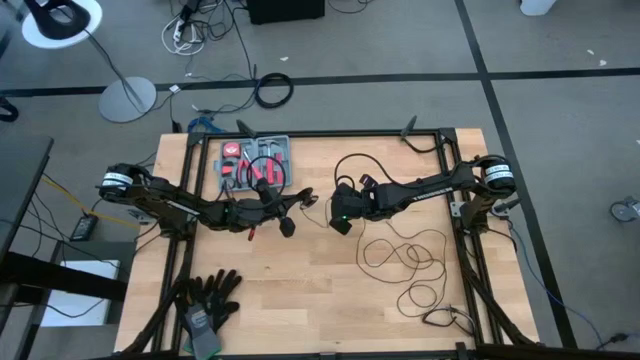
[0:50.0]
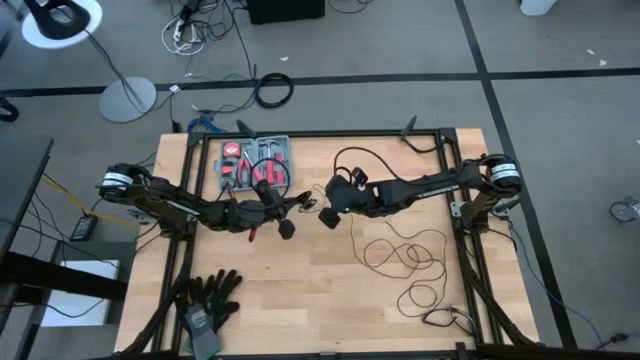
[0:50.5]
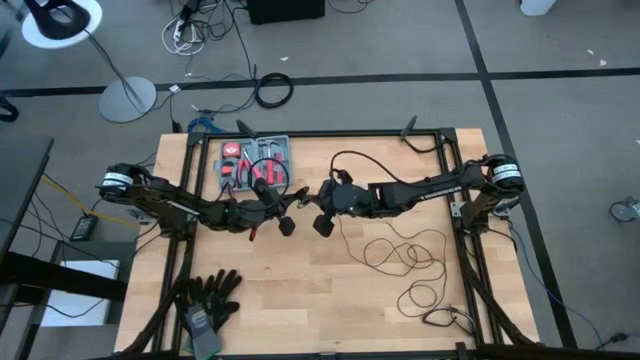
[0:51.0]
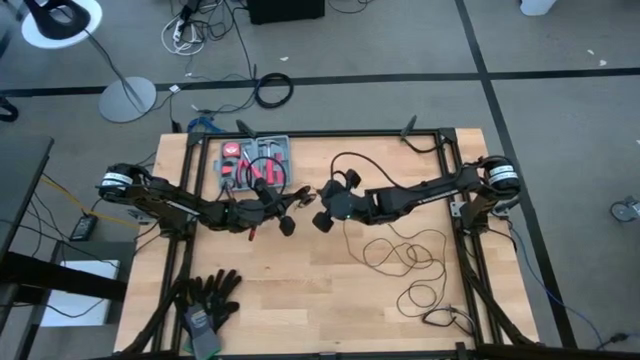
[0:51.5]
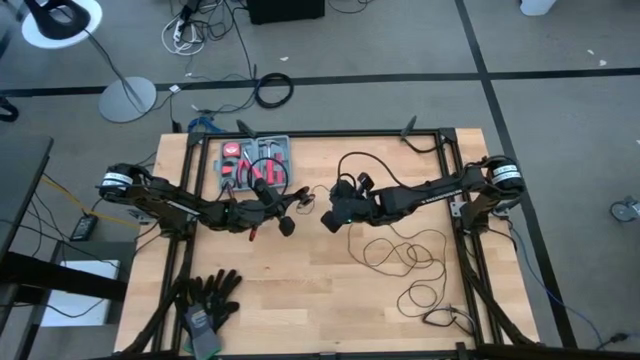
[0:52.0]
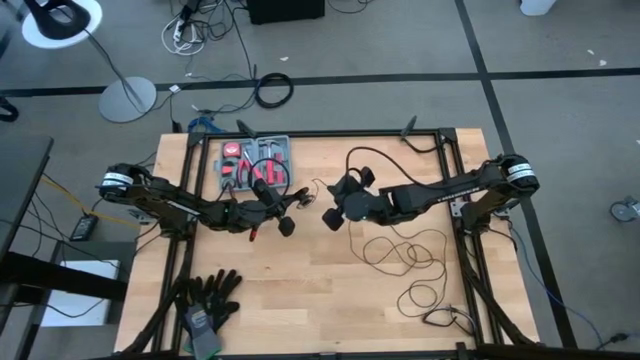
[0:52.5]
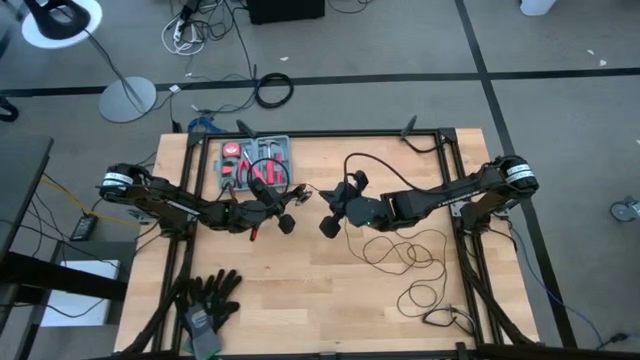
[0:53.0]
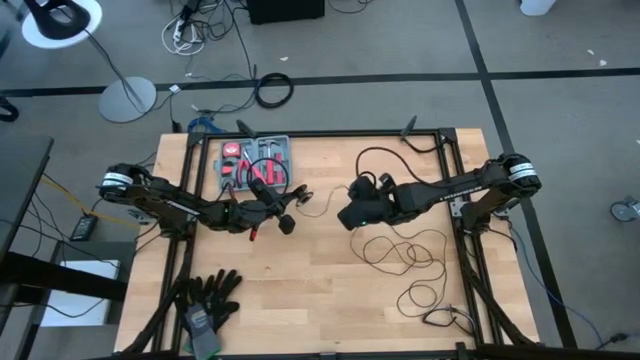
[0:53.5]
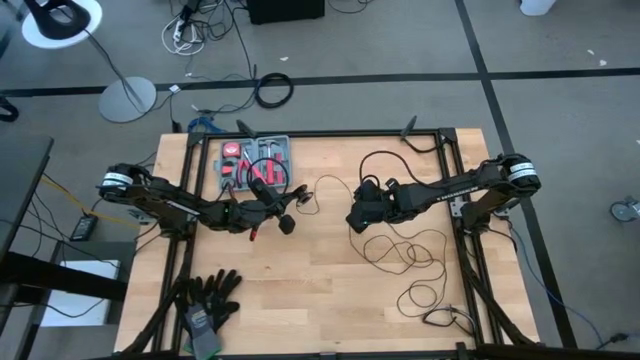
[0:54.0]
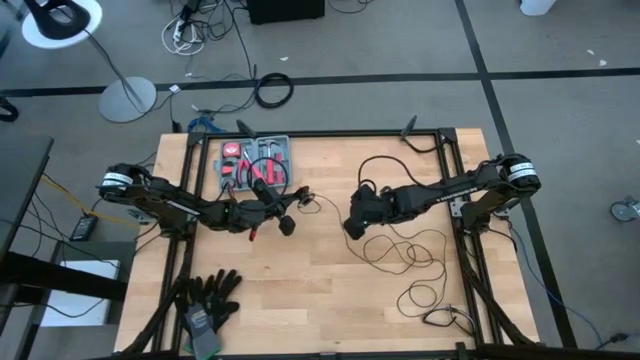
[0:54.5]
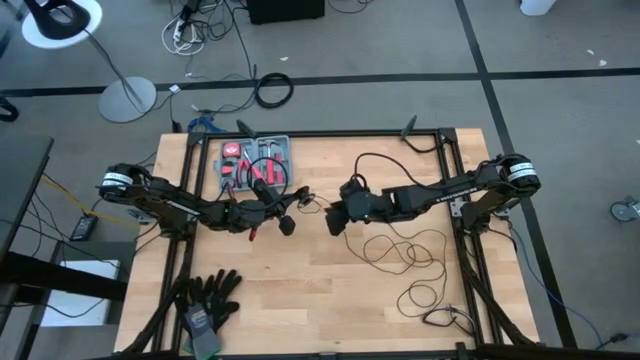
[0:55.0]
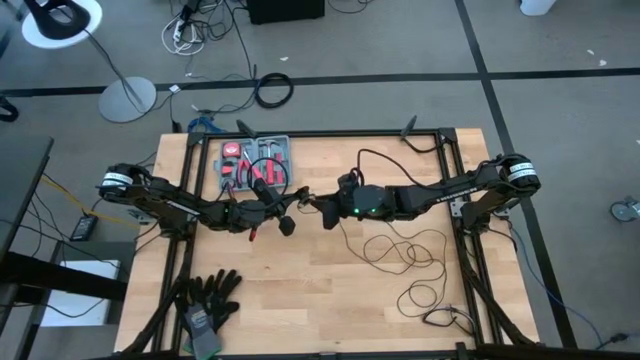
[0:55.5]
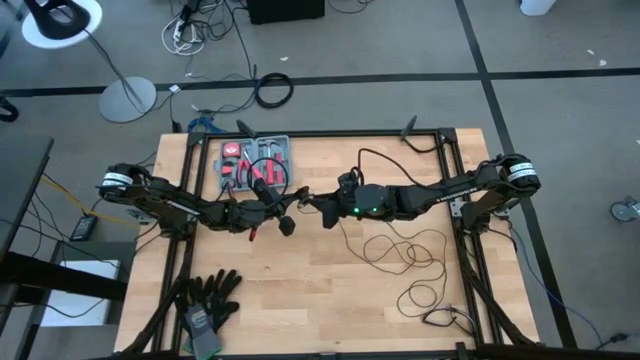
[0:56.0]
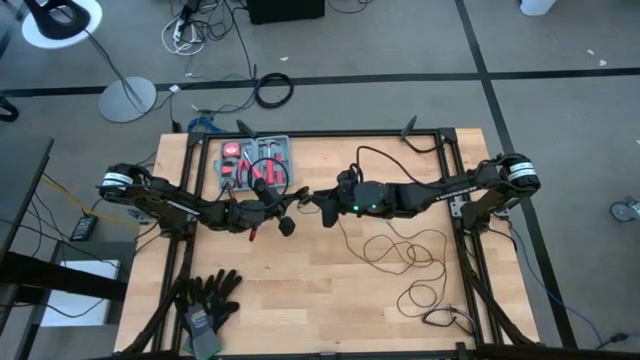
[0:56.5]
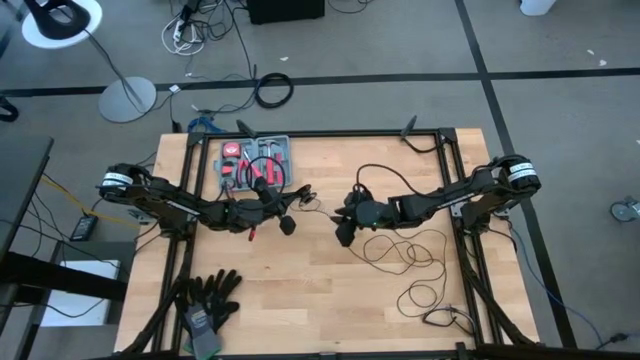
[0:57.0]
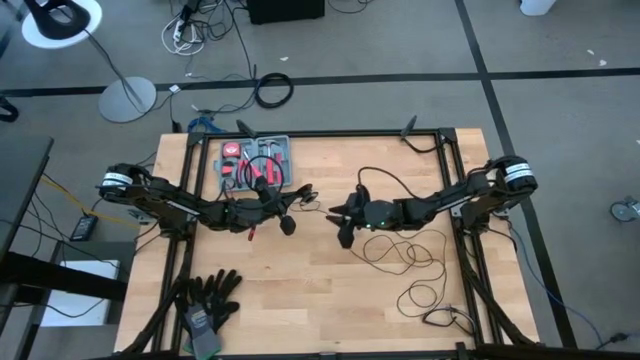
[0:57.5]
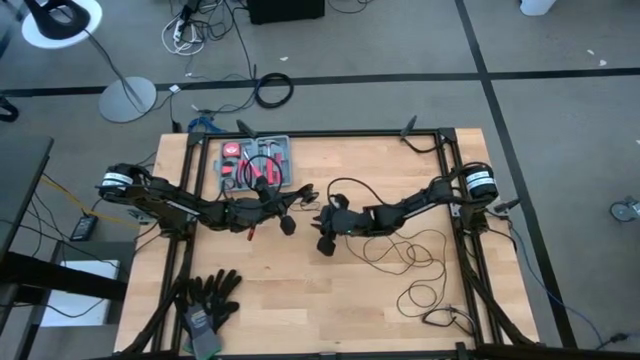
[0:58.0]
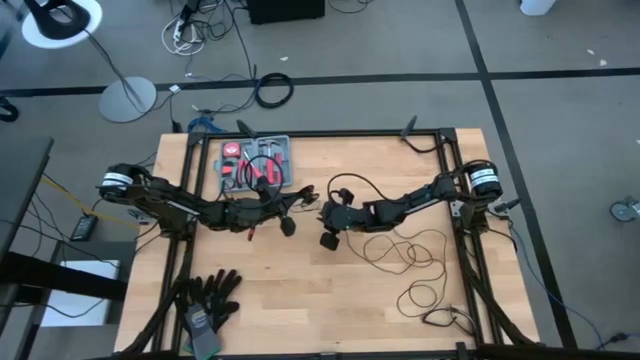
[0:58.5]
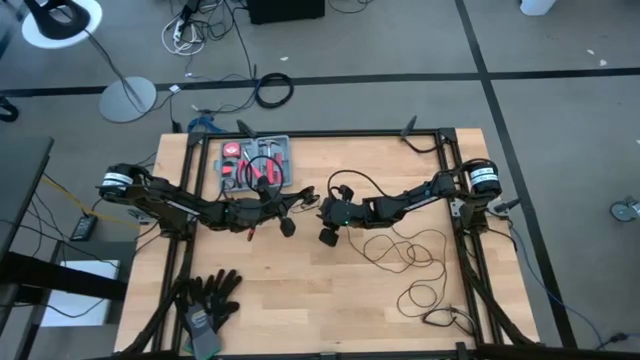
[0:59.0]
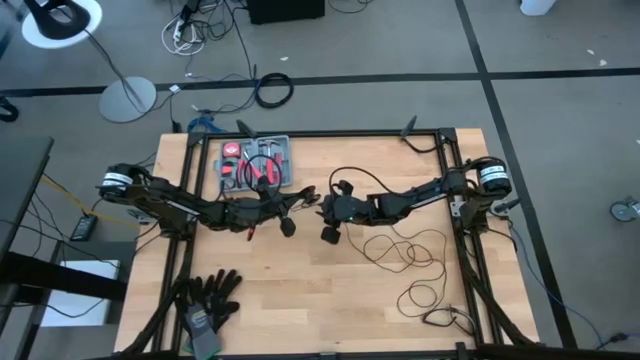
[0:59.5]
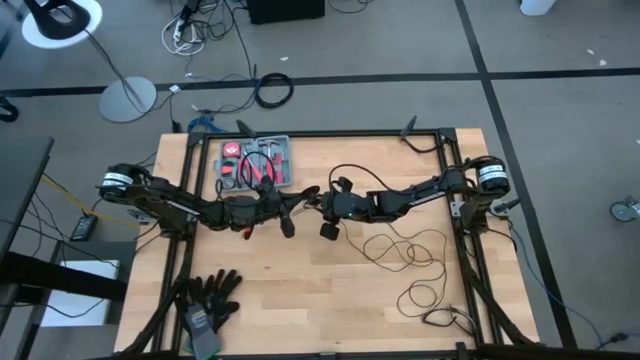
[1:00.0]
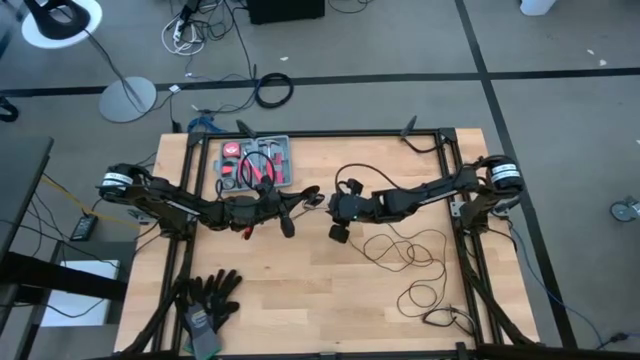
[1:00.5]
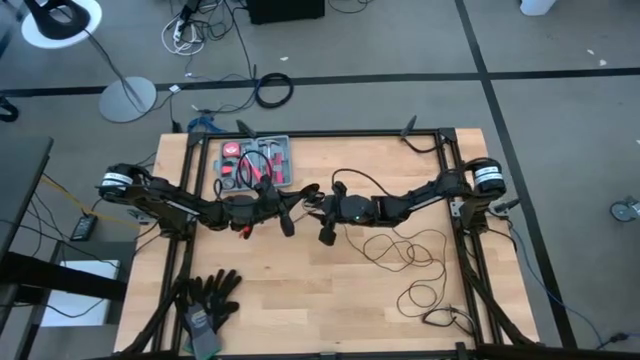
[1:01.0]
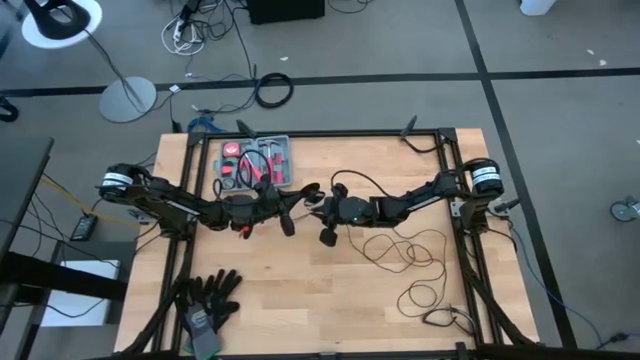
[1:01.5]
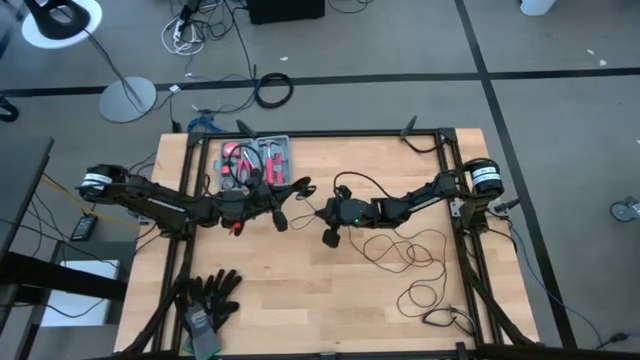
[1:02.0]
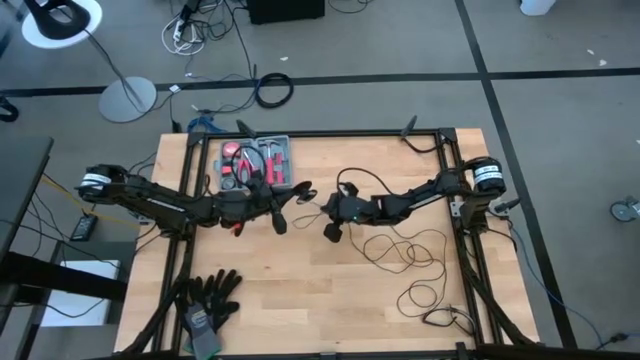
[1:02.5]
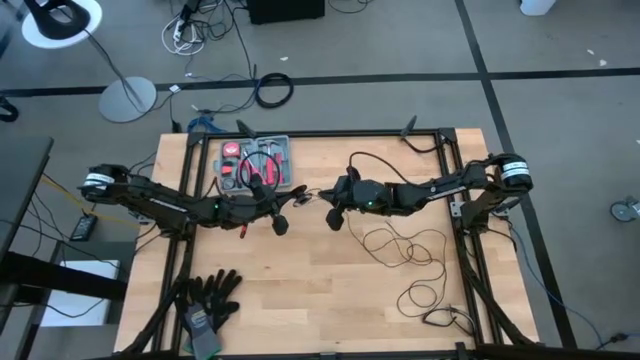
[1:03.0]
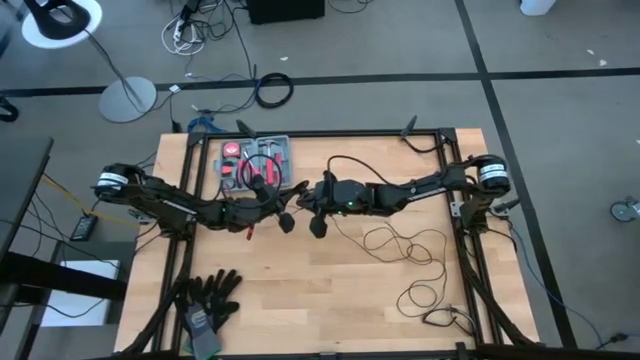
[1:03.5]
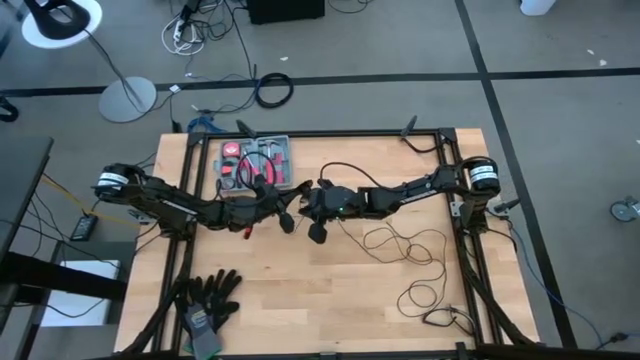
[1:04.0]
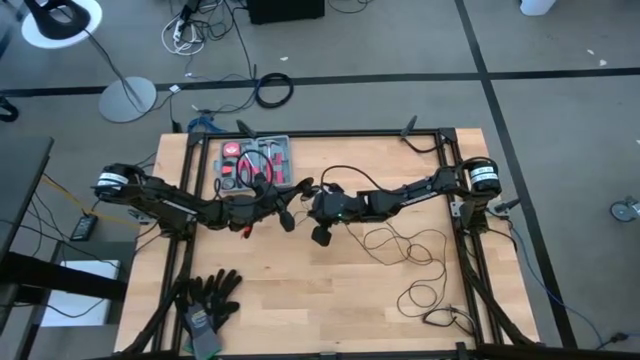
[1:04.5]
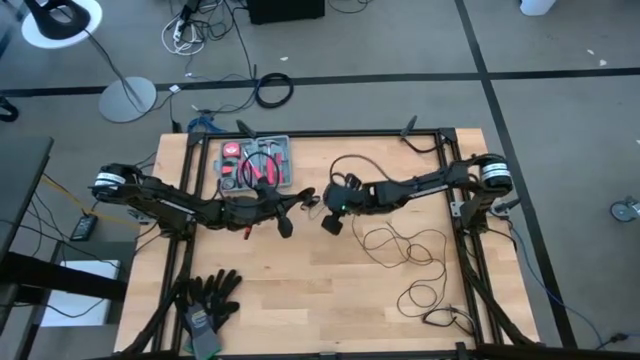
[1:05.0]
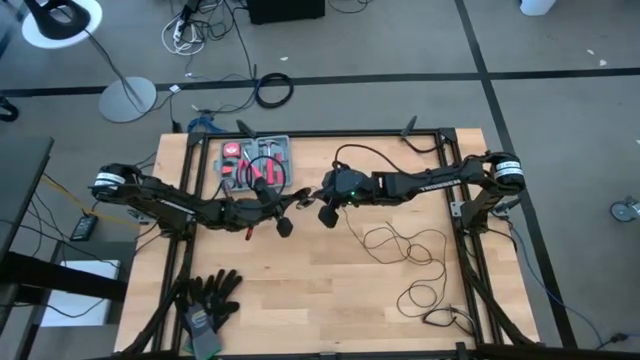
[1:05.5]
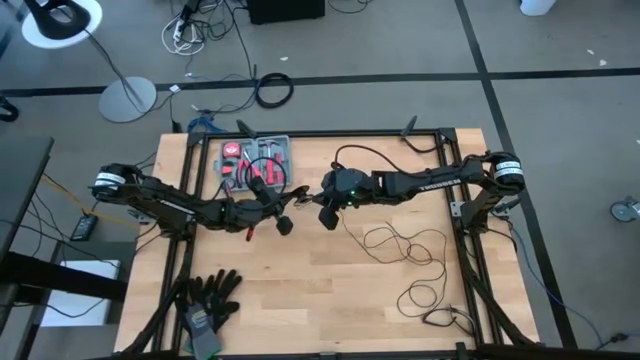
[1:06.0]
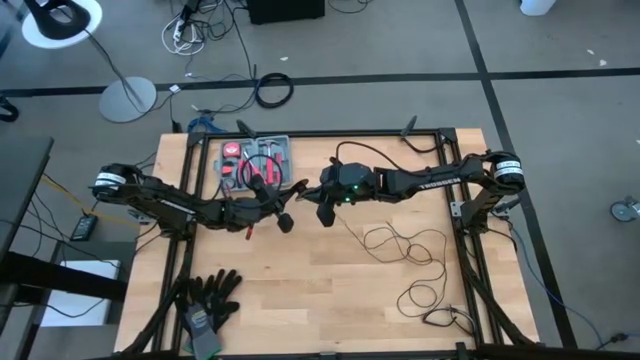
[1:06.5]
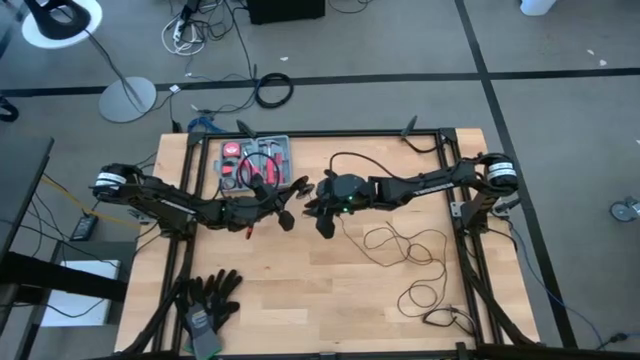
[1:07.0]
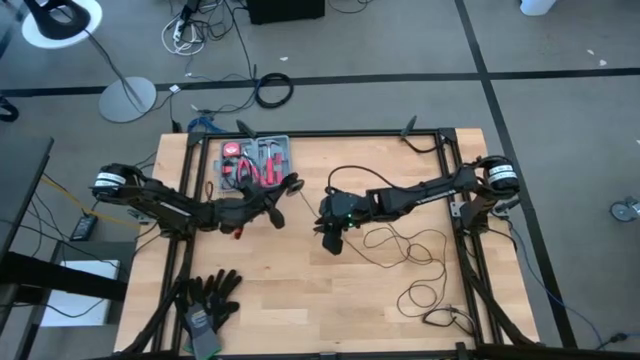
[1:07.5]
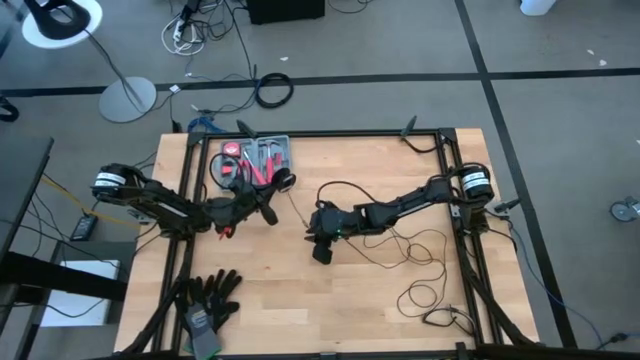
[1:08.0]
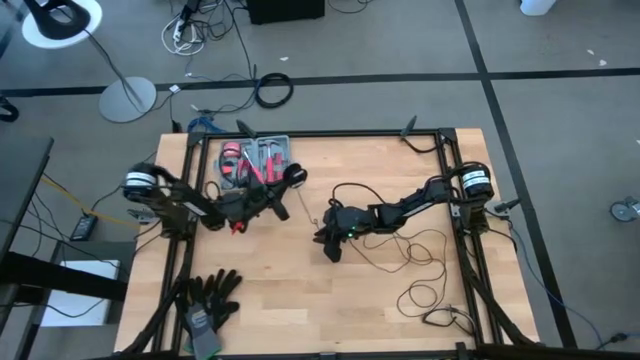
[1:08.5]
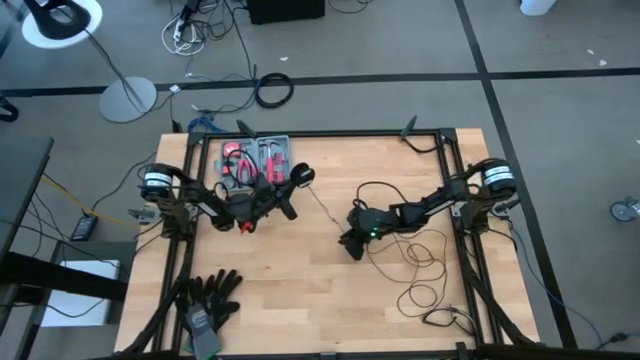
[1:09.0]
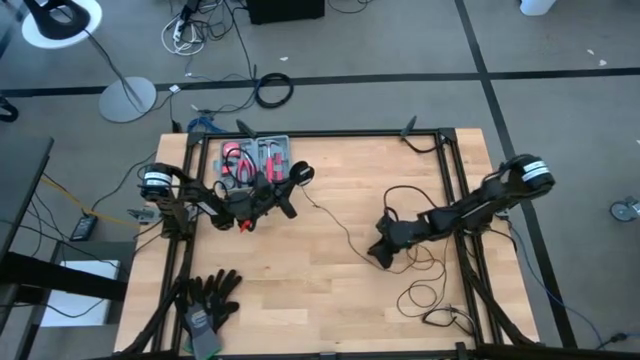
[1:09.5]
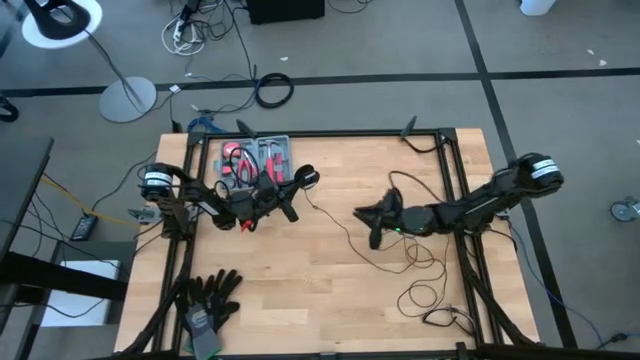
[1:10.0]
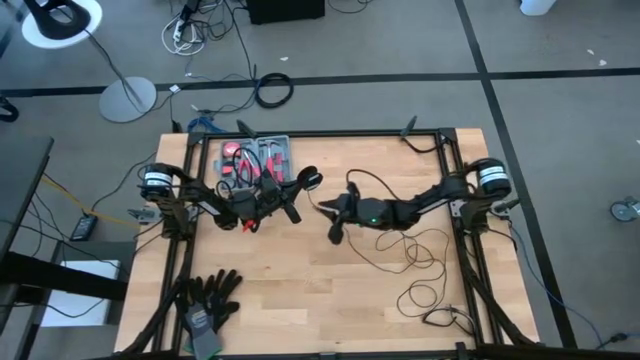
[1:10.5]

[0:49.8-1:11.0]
Task: Coil cords
Coil the black cable wire on the spool
